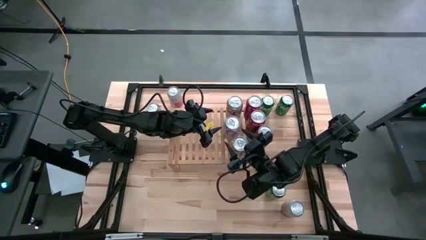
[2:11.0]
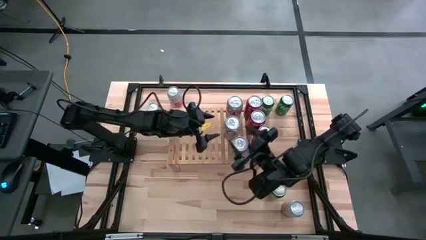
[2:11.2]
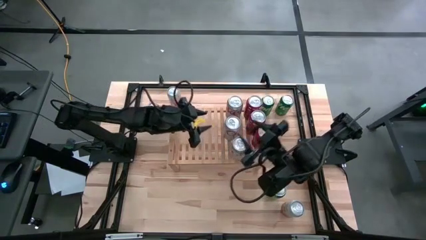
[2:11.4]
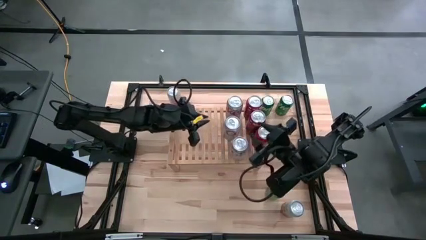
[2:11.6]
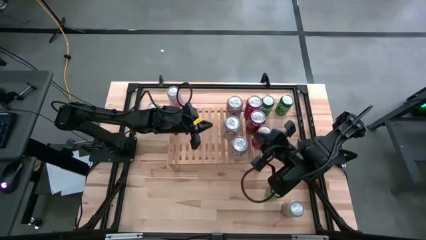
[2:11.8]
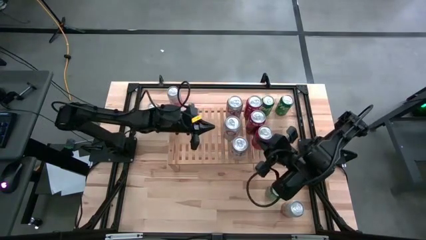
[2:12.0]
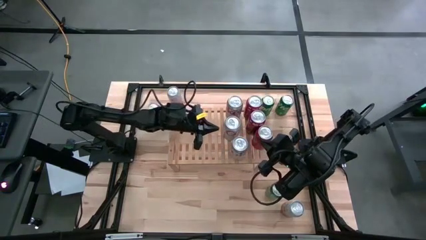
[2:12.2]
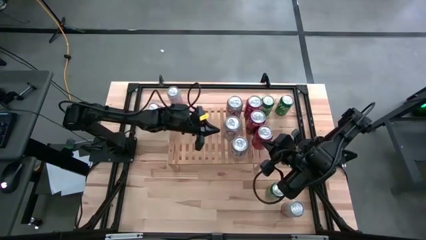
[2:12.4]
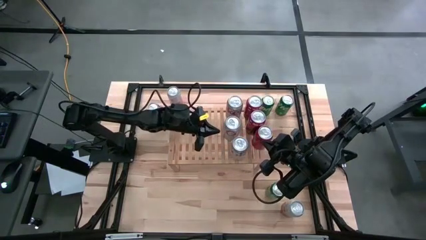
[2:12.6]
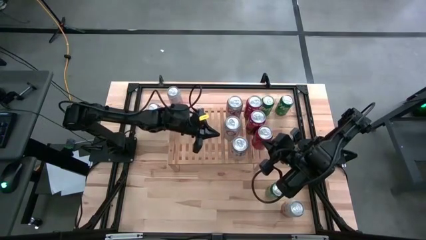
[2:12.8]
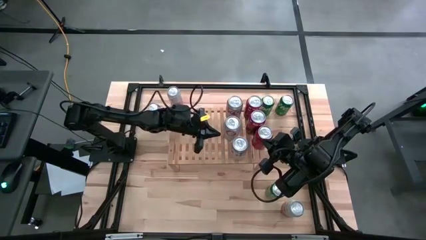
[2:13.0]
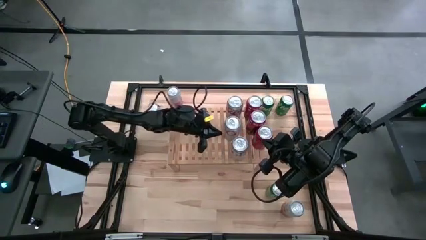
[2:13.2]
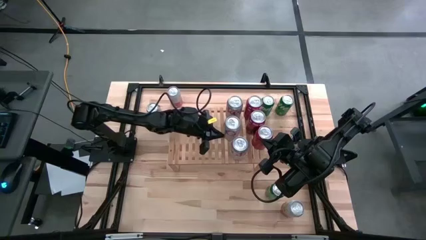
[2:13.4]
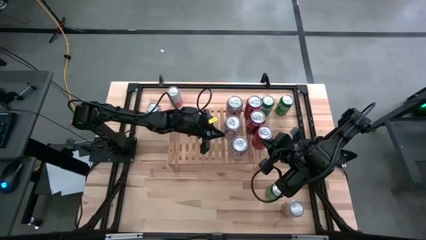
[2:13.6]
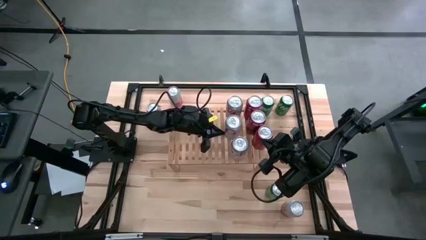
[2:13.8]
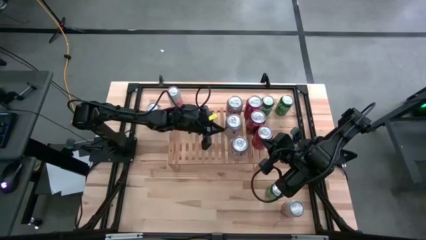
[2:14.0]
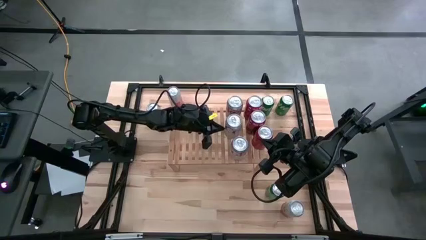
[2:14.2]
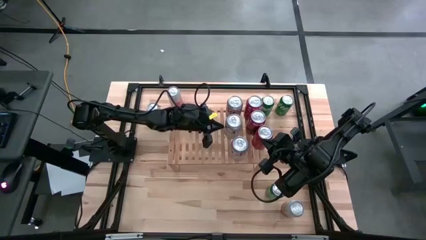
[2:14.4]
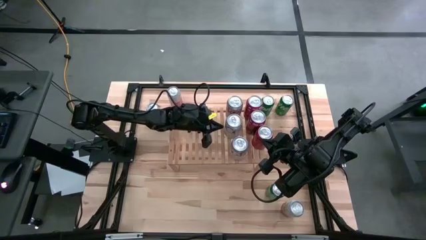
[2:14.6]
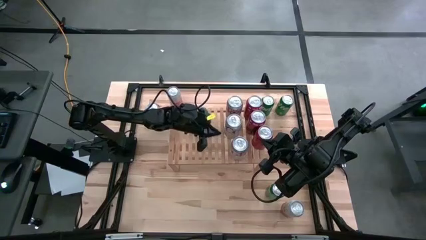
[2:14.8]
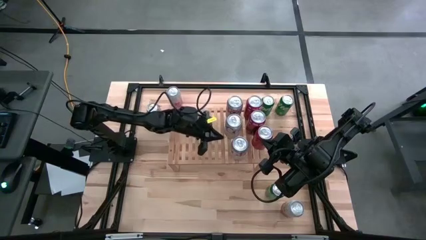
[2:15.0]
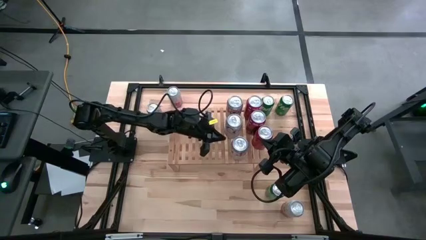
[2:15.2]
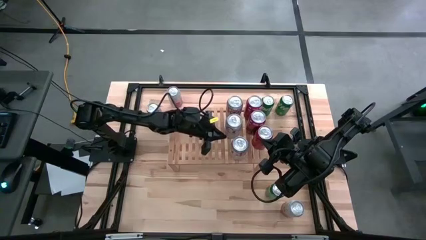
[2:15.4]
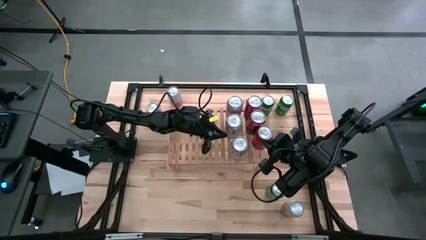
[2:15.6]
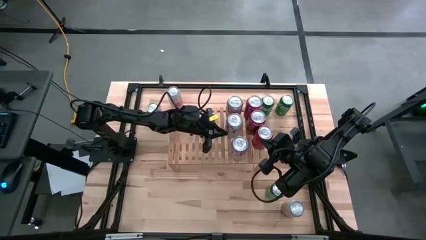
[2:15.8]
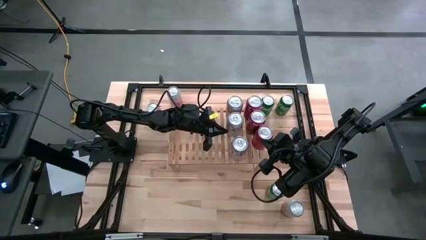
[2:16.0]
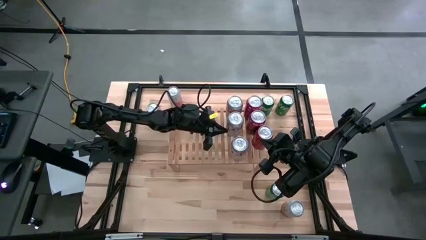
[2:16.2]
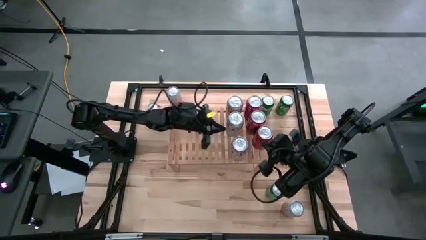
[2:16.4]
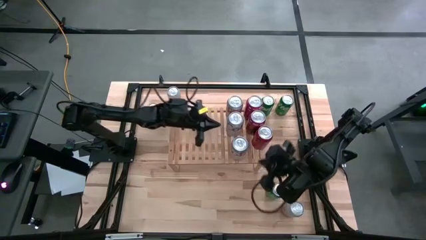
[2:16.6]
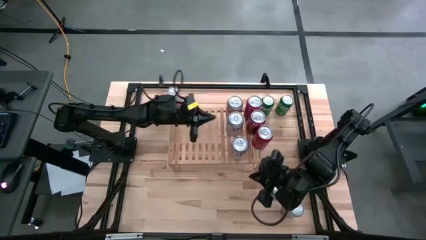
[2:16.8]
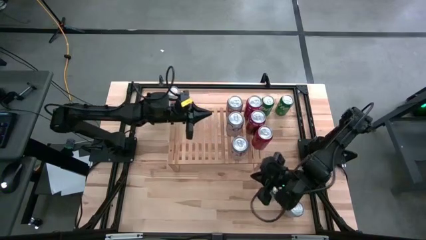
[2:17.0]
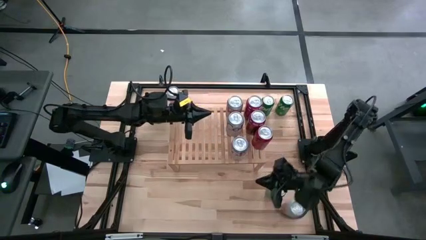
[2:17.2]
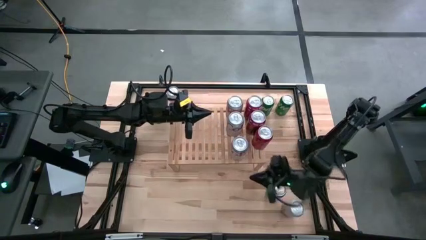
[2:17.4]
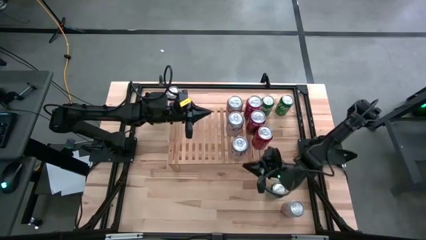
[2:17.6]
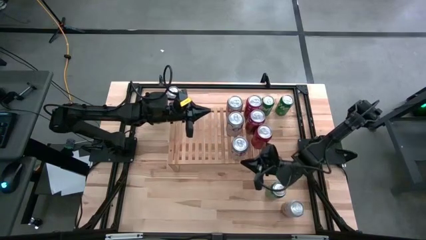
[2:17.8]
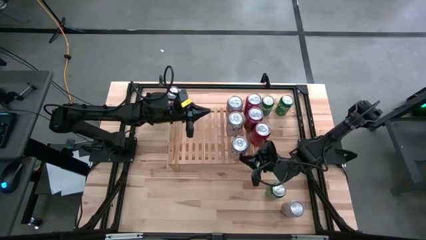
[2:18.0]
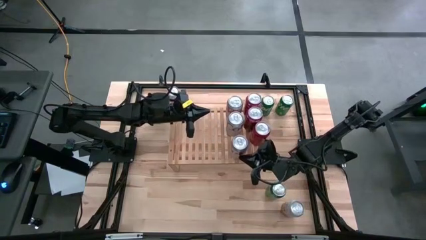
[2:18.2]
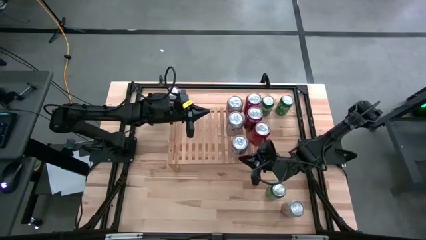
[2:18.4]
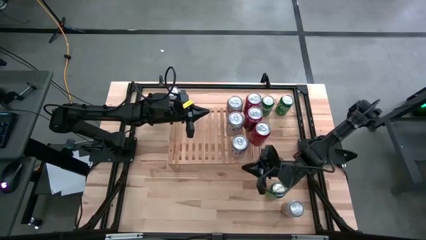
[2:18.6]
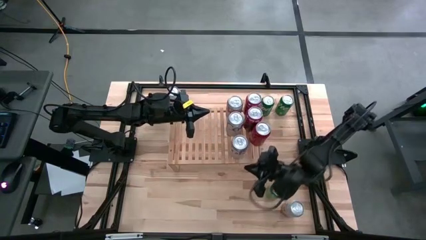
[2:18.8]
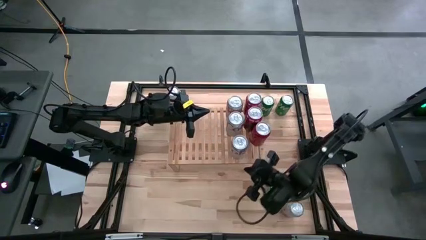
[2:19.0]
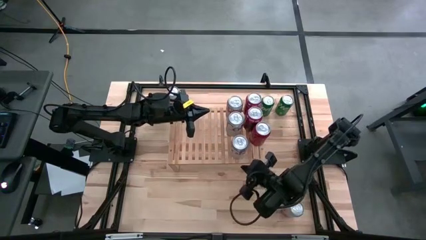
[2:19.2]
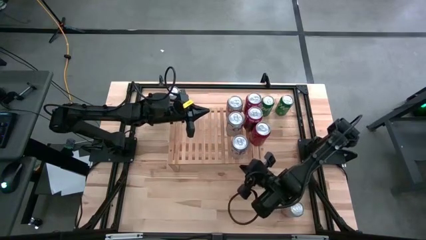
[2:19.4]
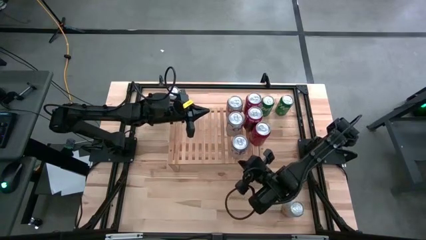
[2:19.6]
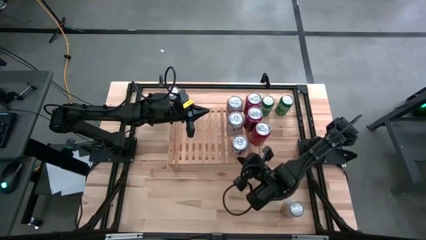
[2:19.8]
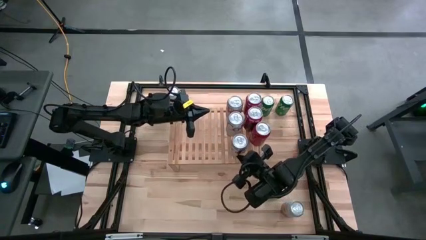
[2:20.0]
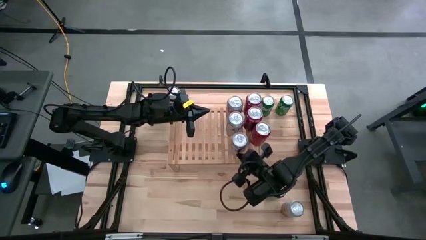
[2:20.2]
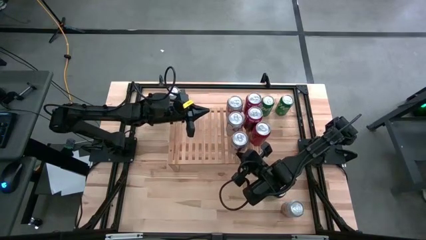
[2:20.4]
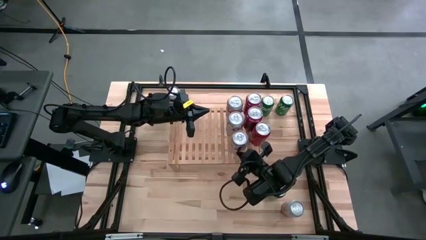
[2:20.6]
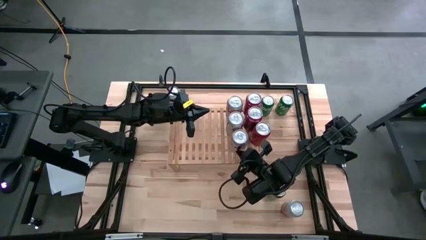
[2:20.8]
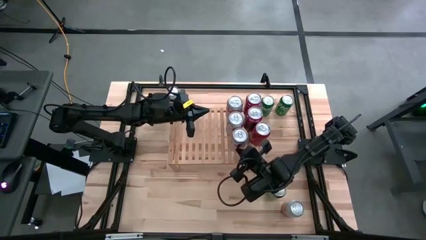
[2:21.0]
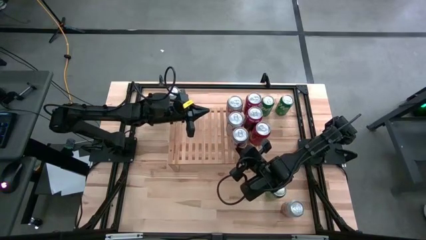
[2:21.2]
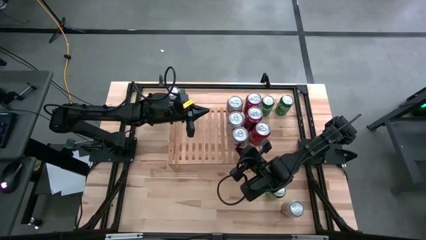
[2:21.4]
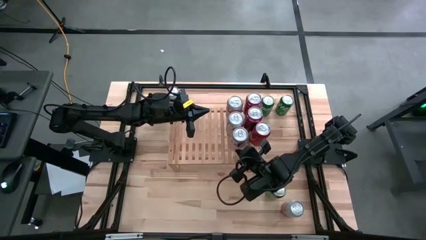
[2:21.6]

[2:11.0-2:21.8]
Task: Place canned beverage on shelf
Adjust the silver soda cans on the shelf

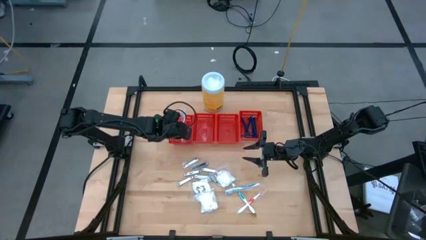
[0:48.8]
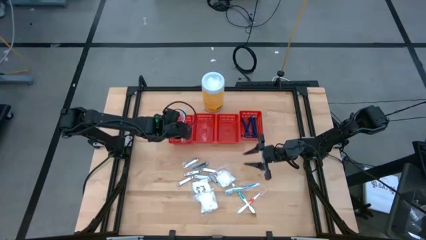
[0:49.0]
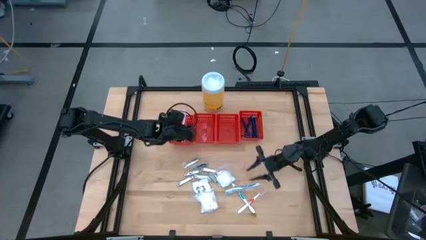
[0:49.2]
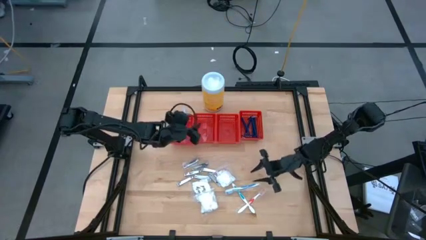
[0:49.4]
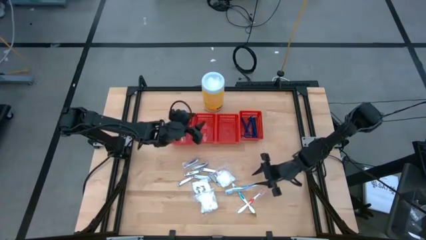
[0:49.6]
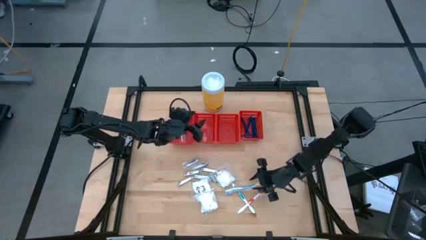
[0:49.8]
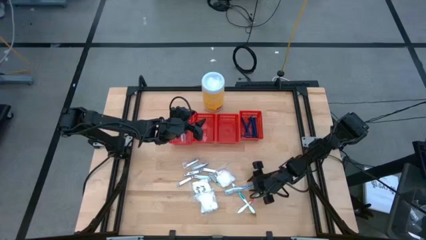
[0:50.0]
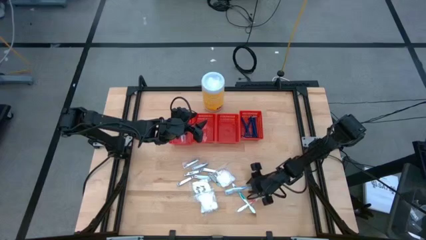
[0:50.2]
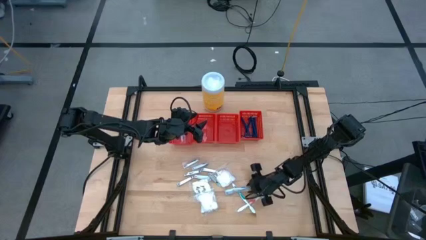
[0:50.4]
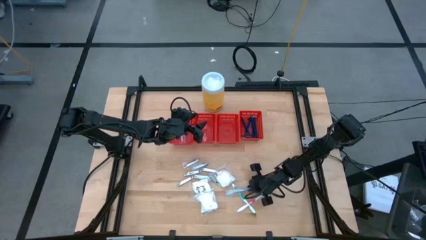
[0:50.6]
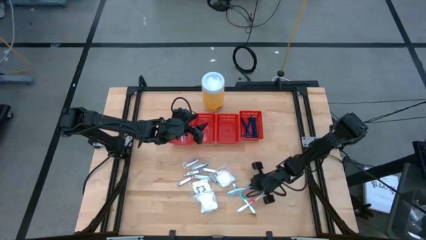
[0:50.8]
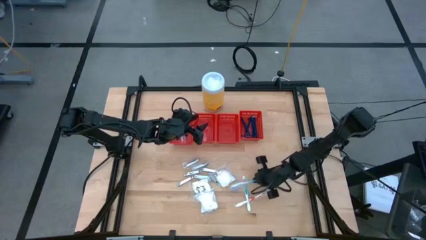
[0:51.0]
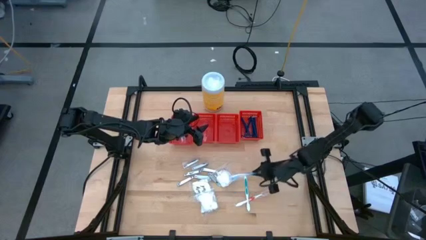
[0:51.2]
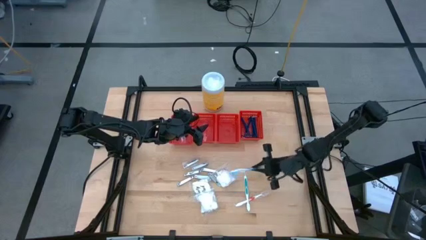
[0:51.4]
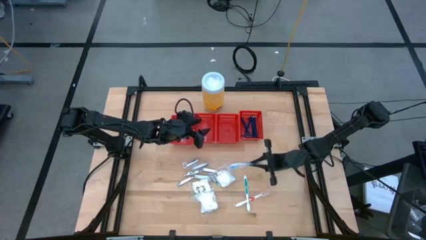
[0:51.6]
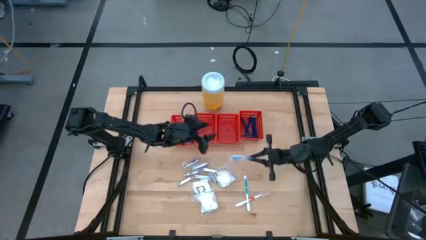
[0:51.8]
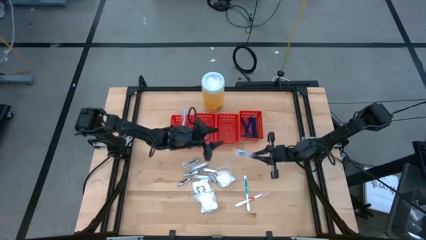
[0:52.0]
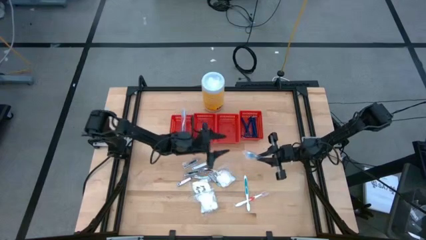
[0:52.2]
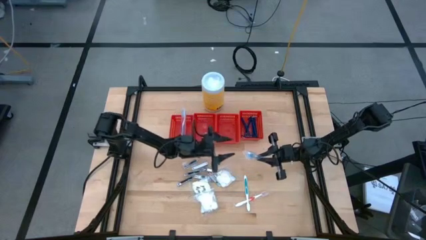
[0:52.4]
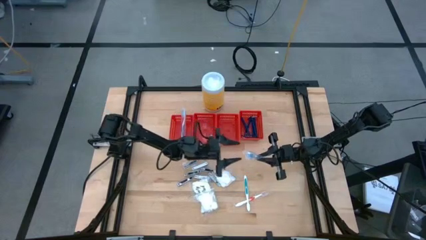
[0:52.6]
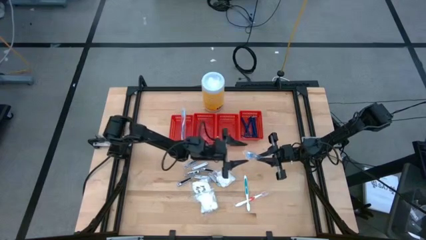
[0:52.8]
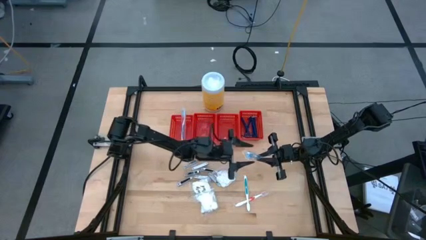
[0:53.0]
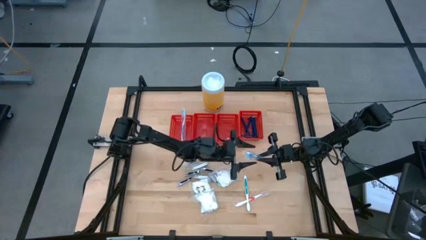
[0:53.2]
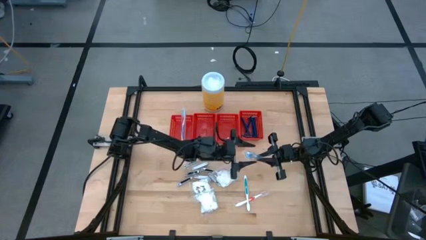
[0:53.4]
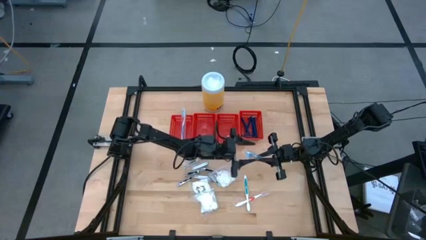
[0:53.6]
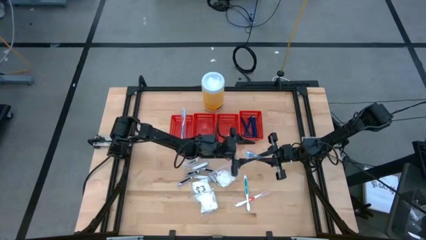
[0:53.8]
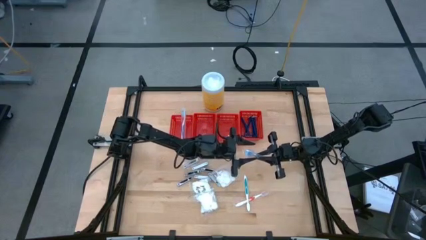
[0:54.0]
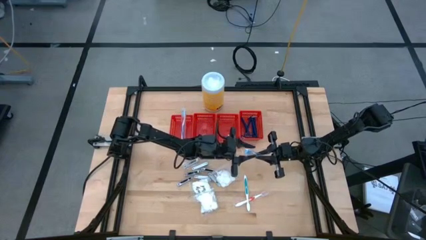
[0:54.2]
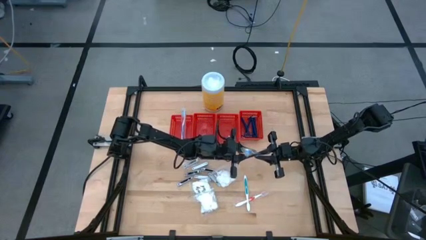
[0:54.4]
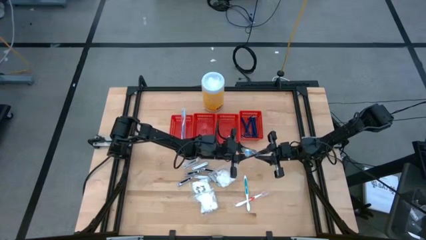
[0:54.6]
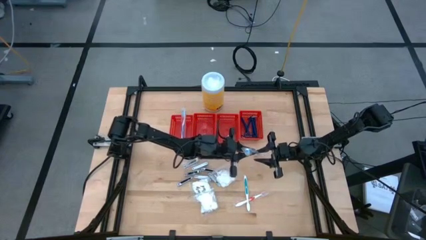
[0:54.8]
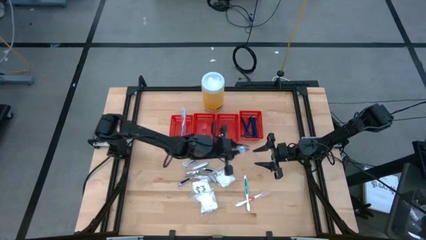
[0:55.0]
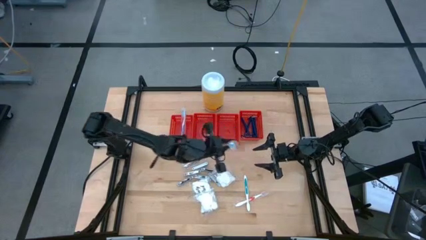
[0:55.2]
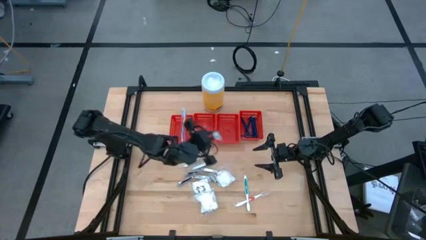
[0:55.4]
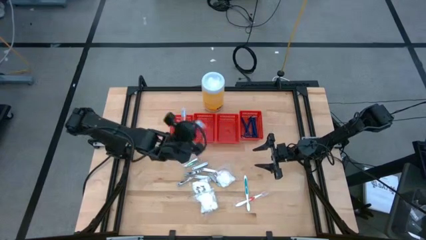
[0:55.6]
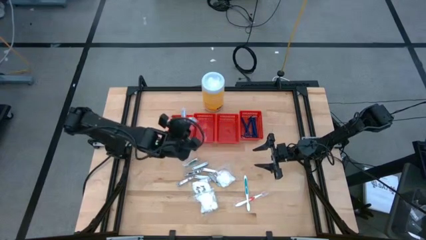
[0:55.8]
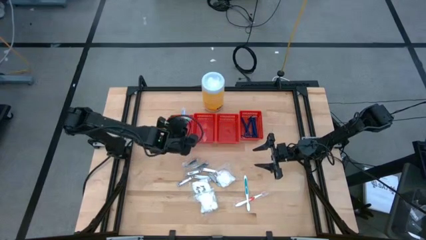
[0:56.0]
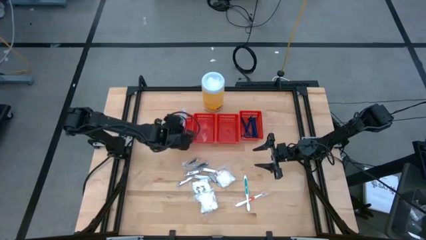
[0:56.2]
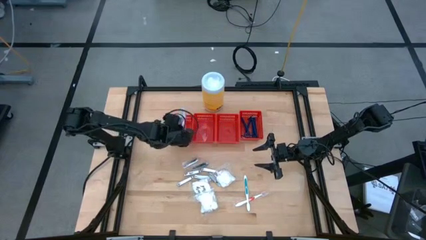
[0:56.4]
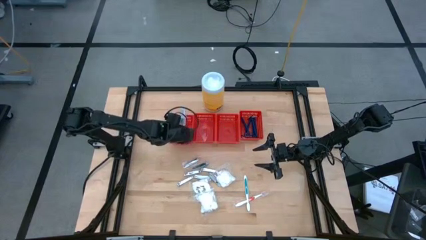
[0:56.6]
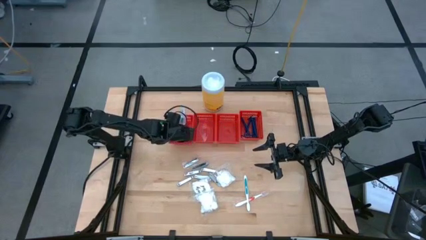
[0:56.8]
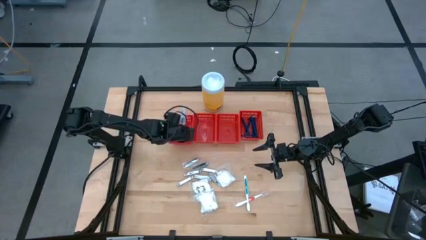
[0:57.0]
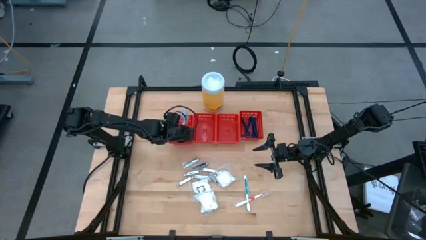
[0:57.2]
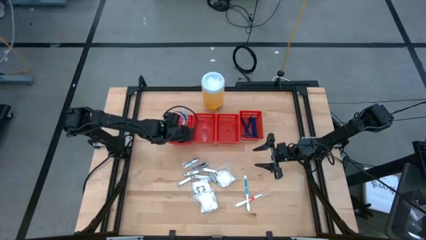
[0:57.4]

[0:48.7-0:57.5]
Task: Pick & Place Travel size toiletries
Put the blue toothbrush into the left red basket
